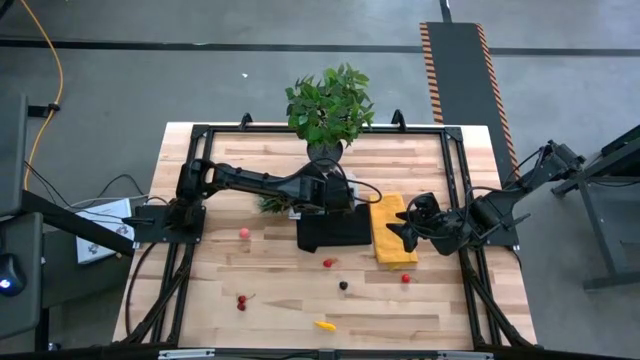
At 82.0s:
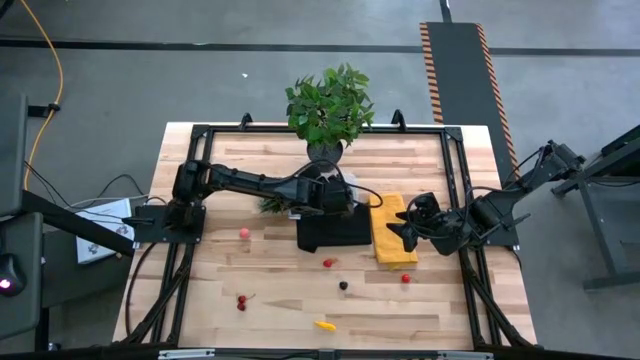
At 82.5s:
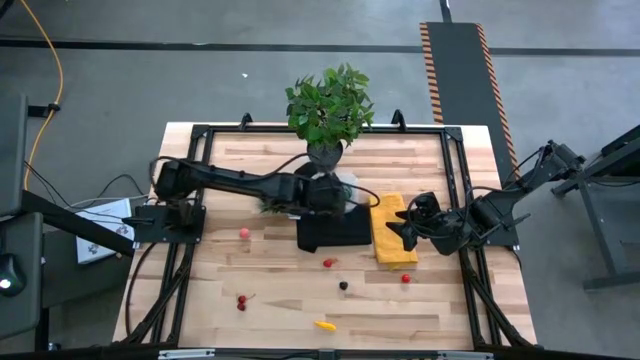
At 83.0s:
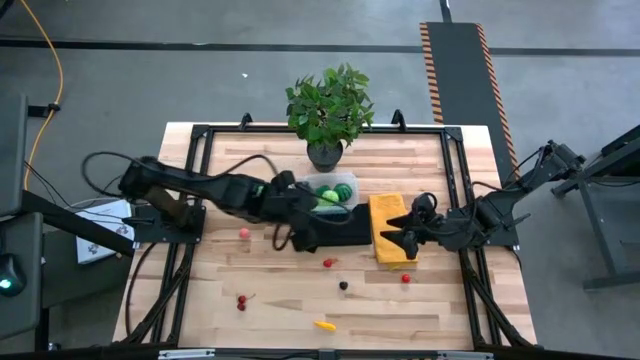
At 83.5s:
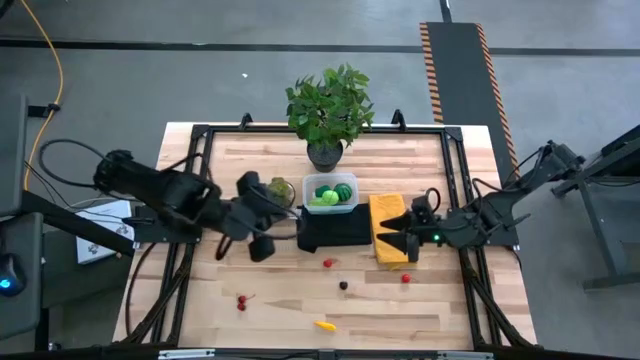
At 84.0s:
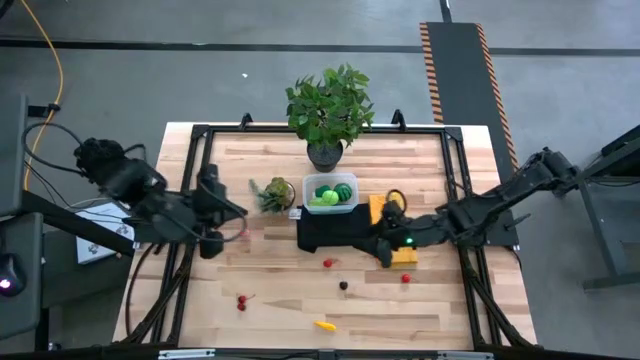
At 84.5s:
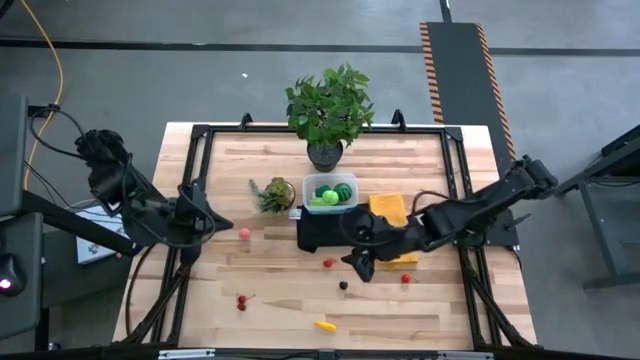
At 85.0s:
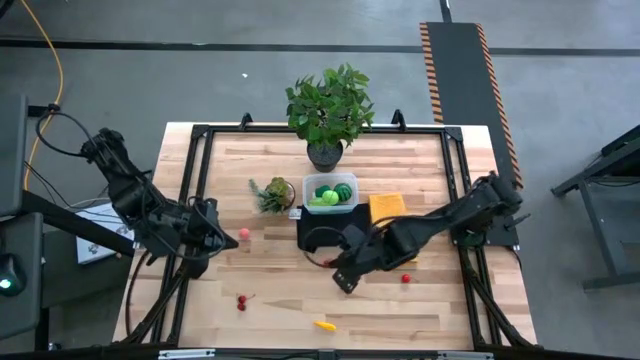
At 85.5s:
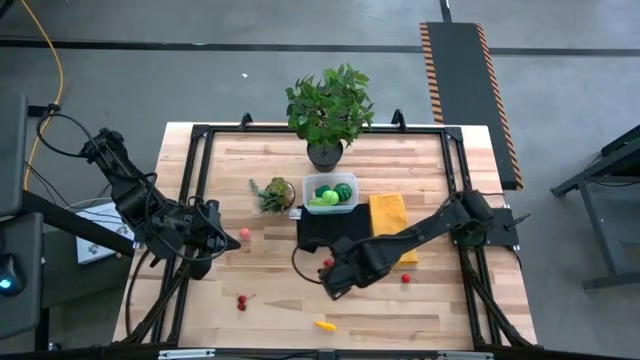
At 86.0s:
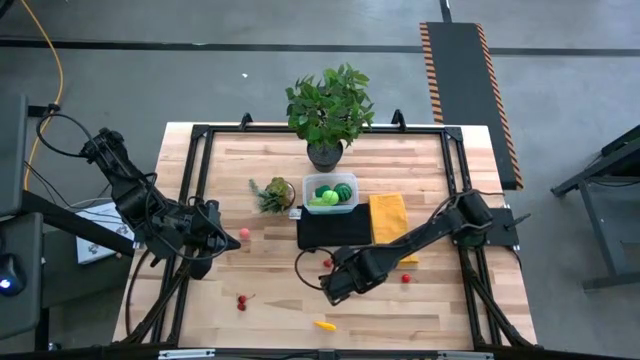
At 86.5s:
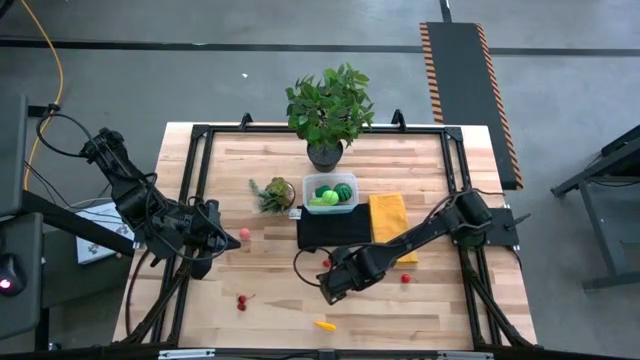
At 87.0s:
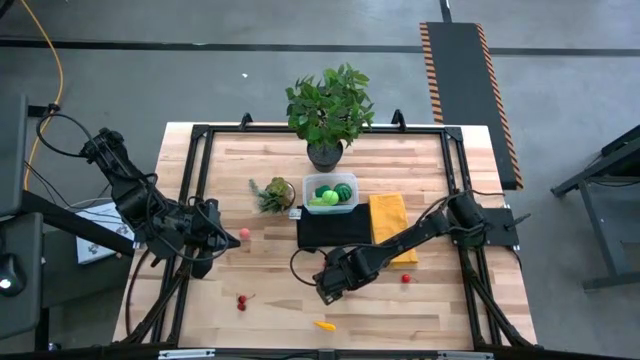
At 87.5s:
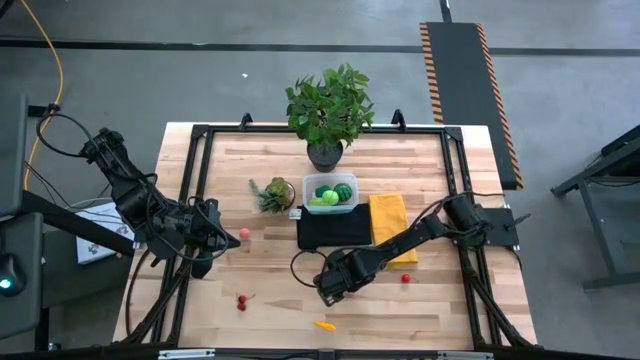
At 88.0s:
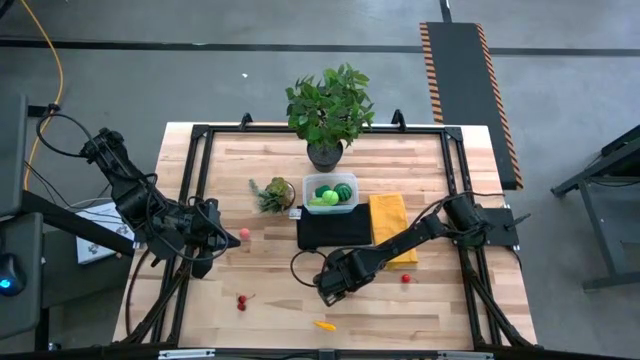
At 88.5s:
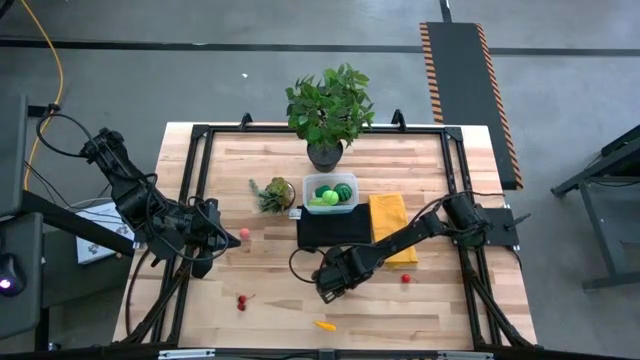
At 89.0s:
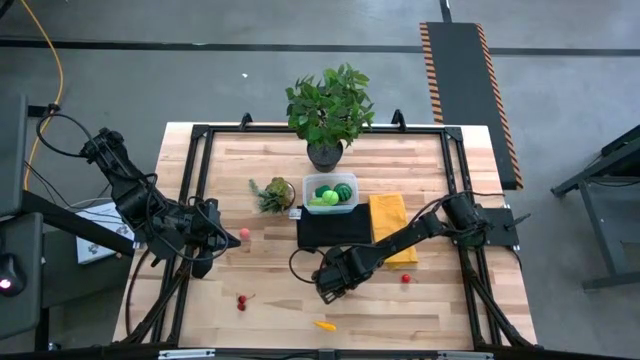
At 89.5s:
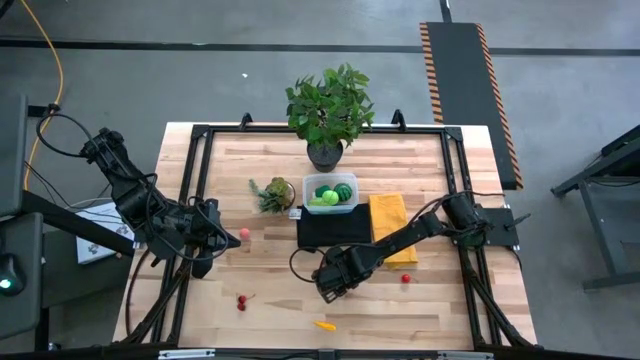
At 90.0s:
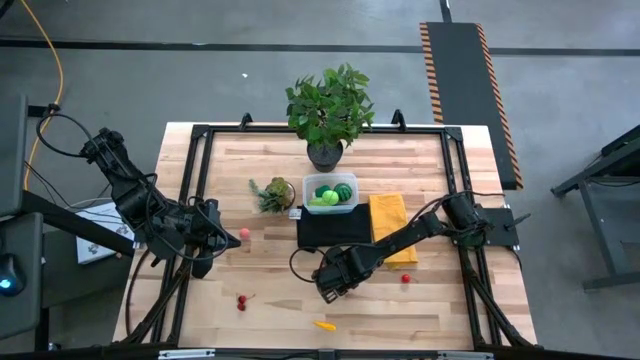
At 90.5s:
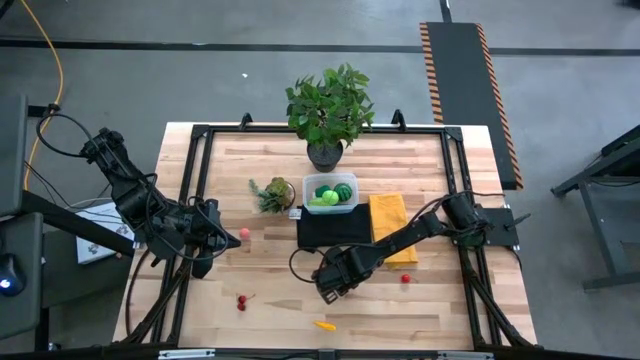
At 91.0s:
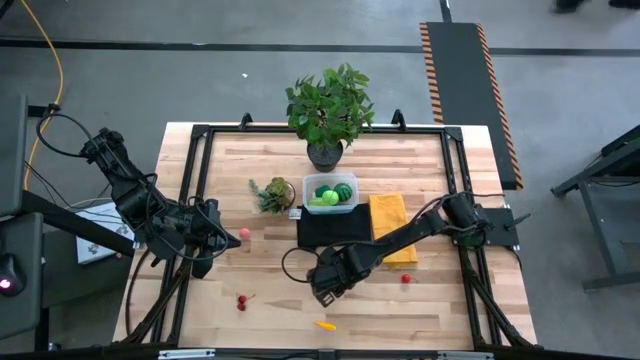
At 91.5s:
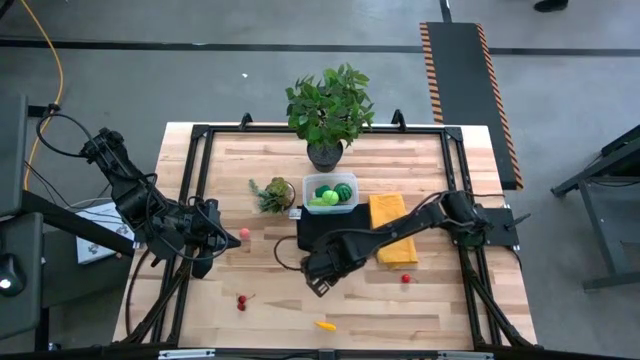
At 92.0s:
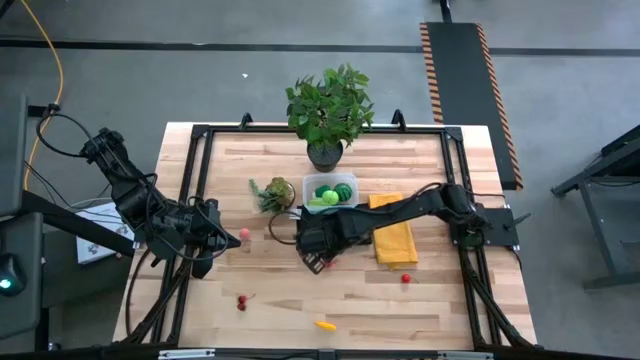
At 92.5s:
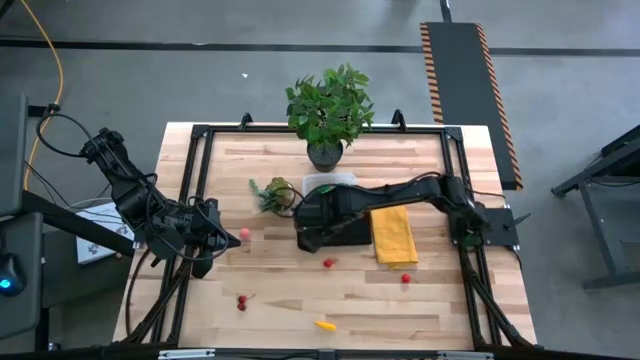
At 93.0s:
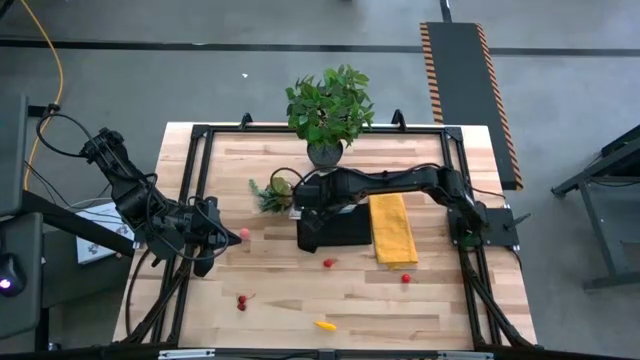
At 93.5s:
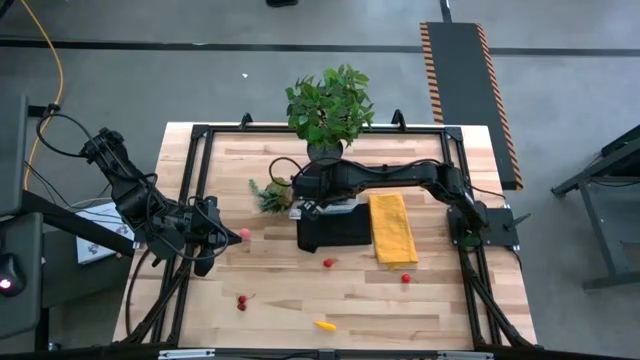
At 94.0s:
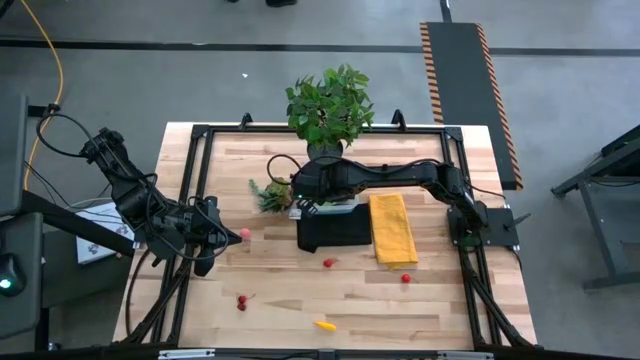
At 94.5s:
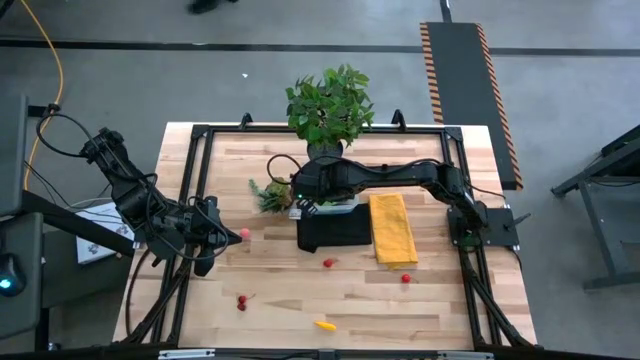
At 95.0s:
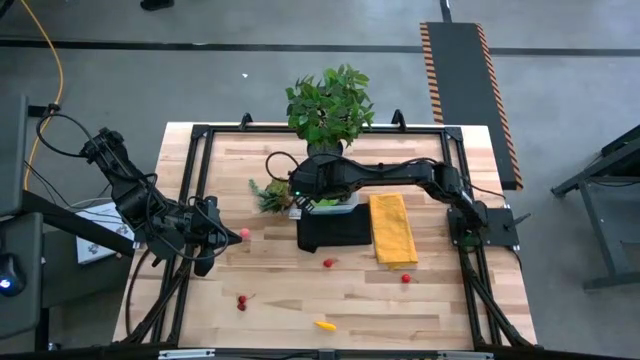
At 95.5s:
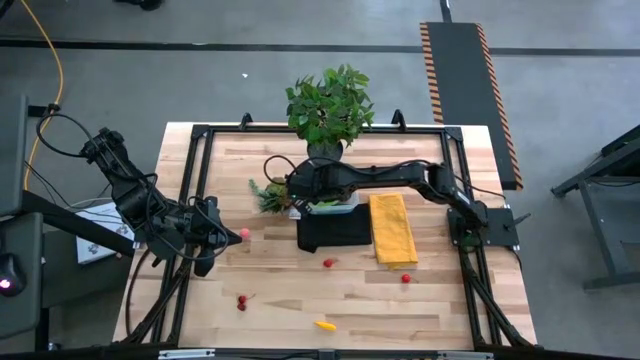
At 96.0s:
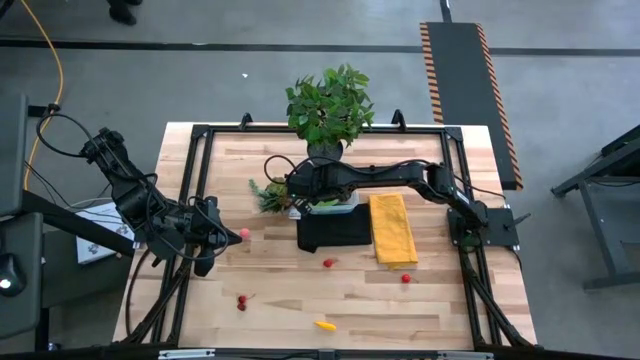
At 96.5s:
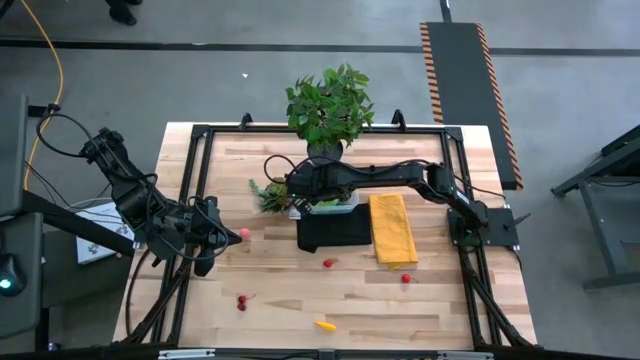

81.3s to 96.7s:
Task: Pick and placing Produce into tupperware
Put the black cherry into the transparent bin

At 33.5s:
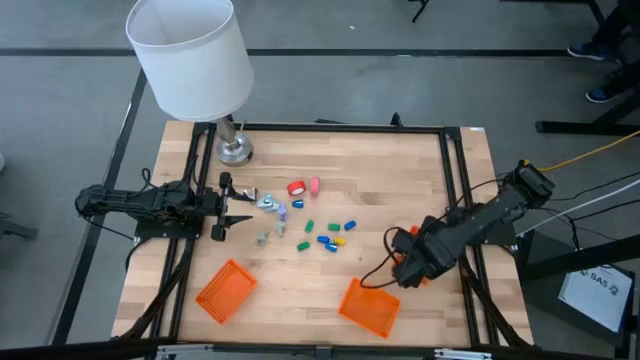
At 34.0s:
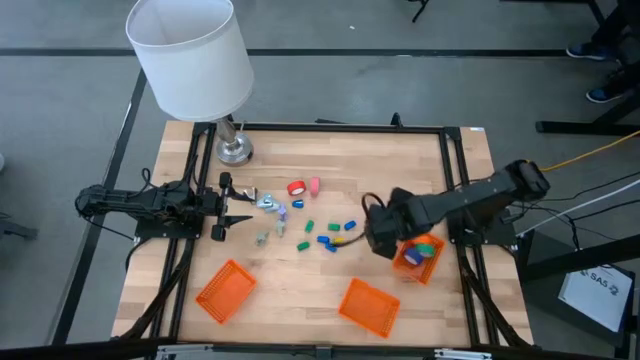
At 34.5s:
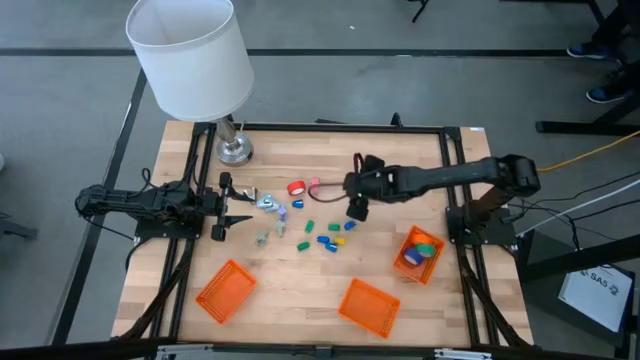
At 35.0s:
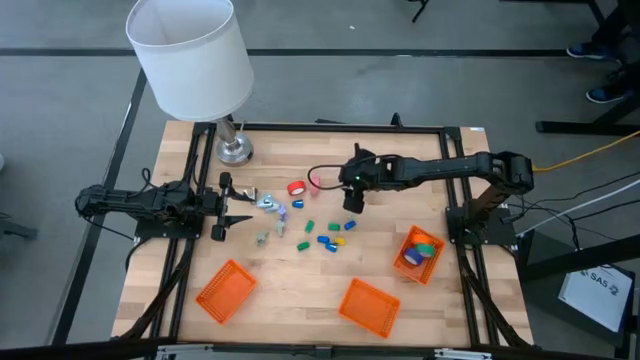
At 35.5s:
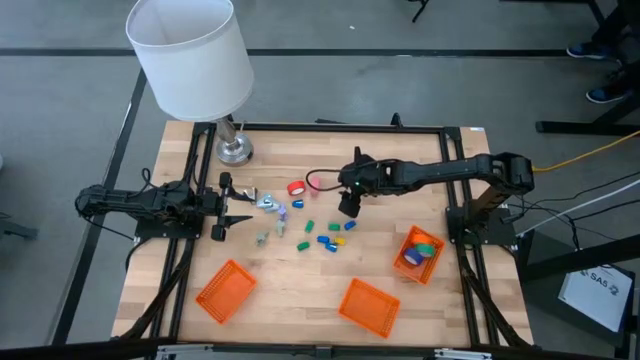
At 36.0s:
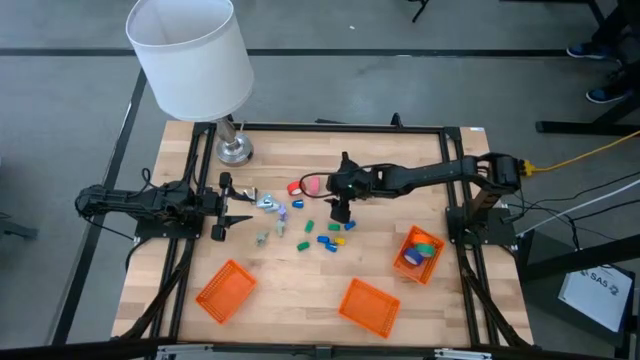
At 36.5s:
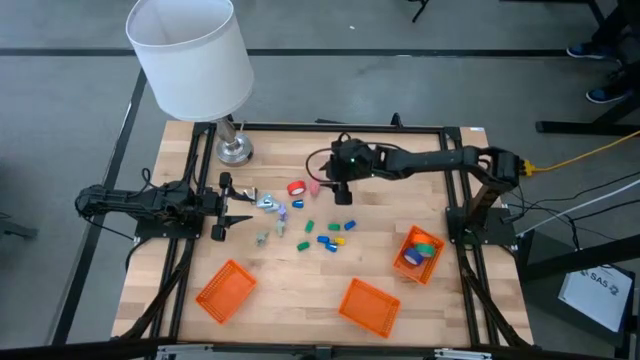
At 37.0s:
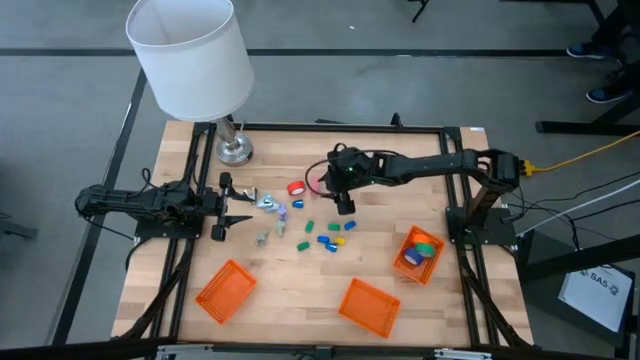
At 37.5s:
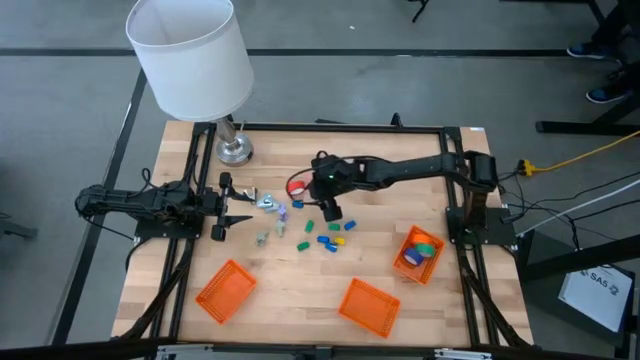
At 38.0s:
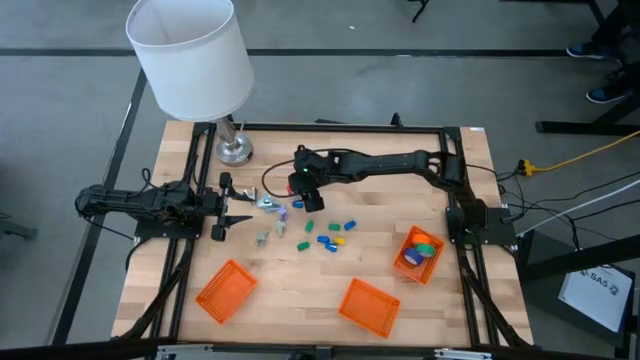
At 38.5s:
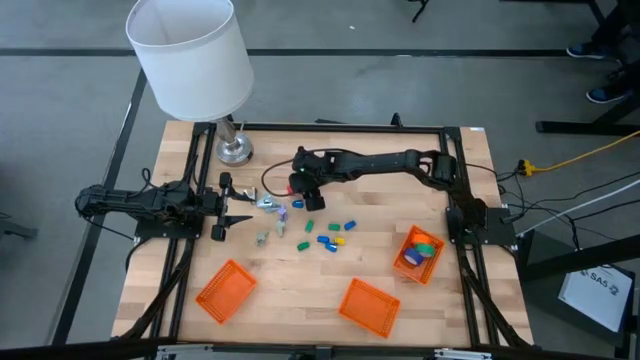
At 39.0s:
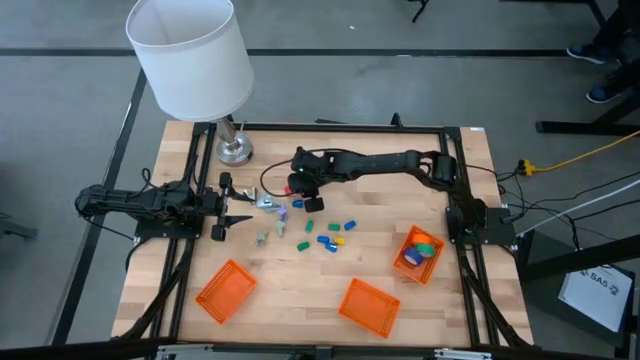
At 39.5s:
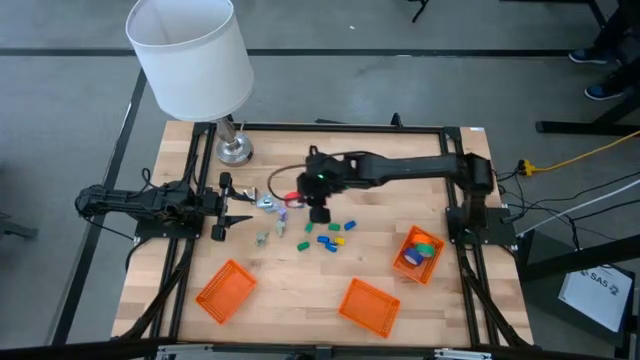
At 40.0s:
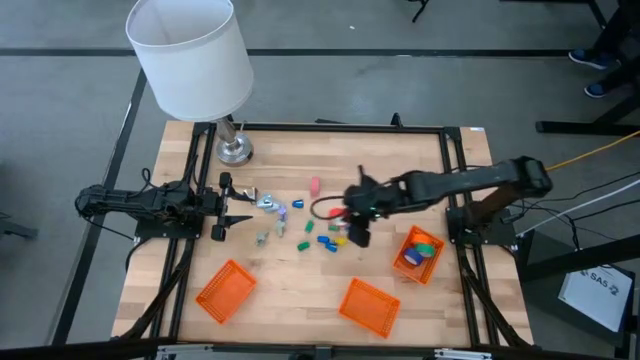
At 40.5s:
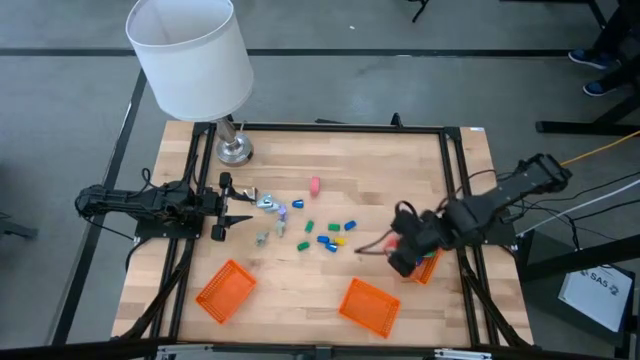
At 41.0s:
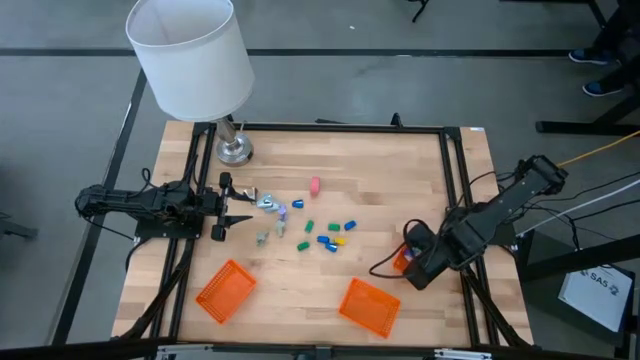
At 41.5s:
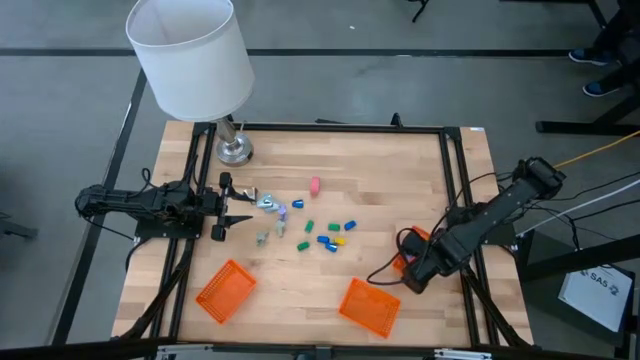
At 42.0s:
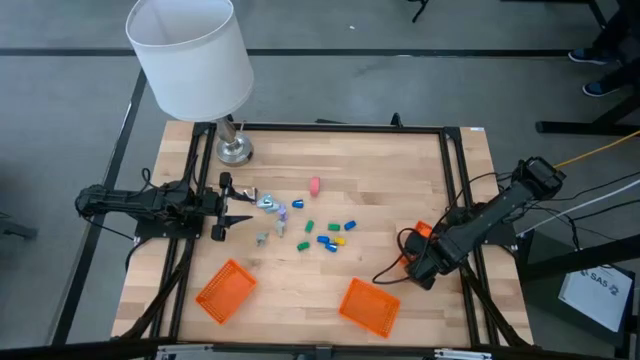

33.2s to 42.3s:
Task: Pick and place Stapler, Stapler remover, tape
Put the red tape into the right orange bin
